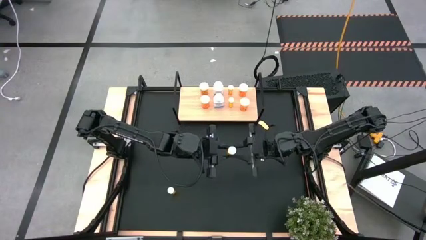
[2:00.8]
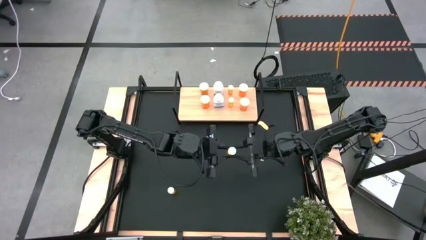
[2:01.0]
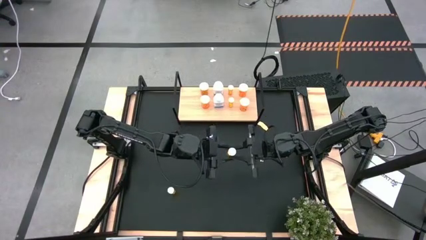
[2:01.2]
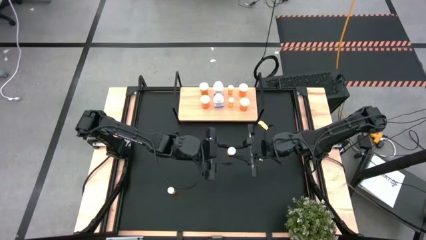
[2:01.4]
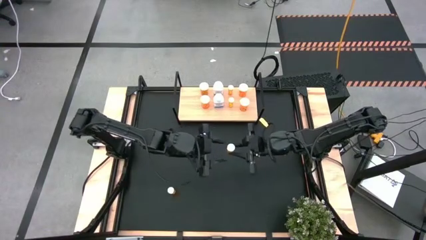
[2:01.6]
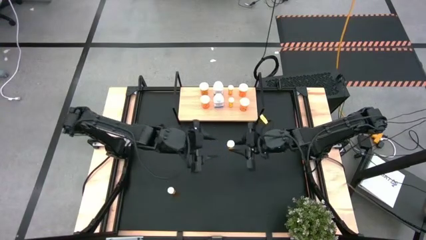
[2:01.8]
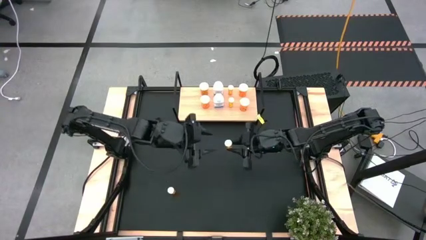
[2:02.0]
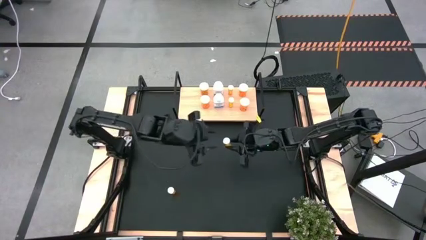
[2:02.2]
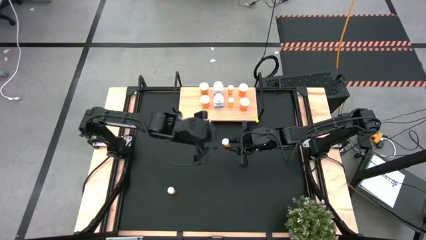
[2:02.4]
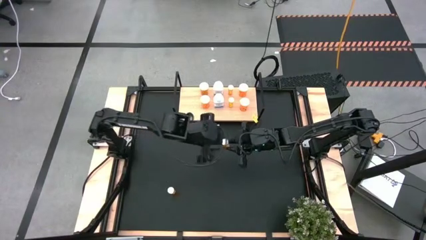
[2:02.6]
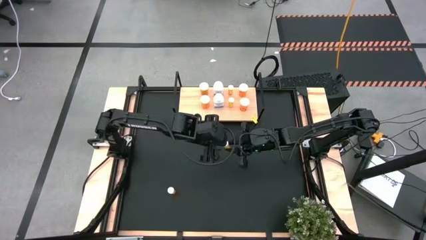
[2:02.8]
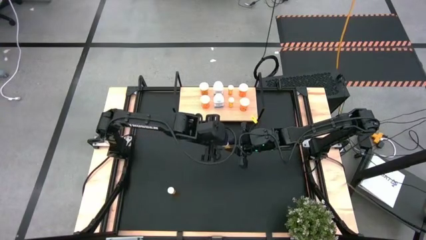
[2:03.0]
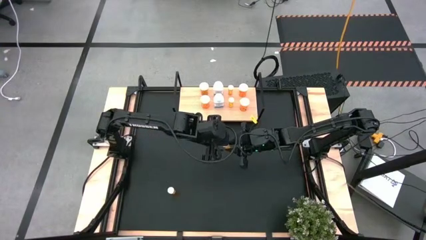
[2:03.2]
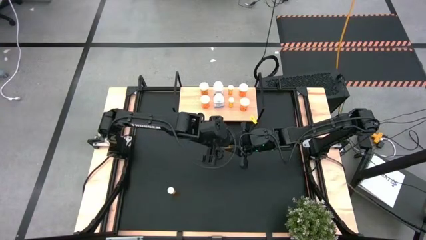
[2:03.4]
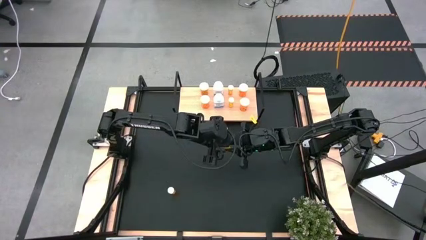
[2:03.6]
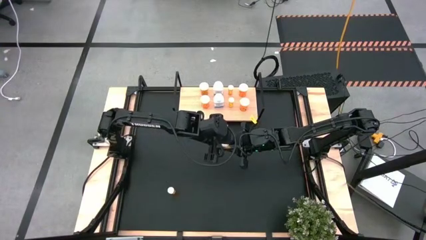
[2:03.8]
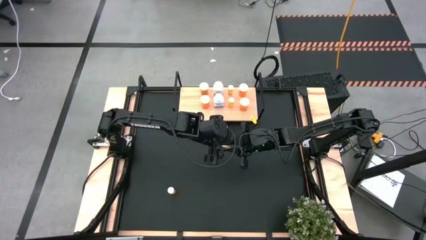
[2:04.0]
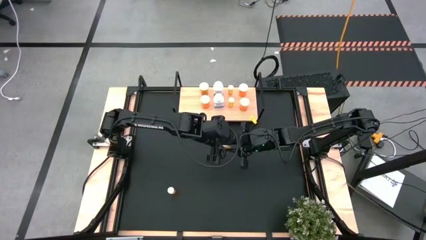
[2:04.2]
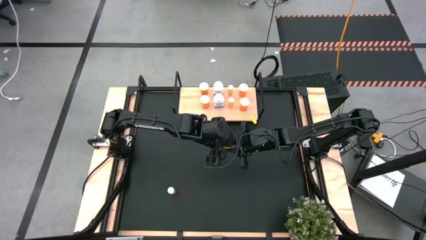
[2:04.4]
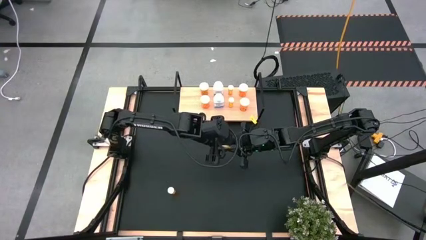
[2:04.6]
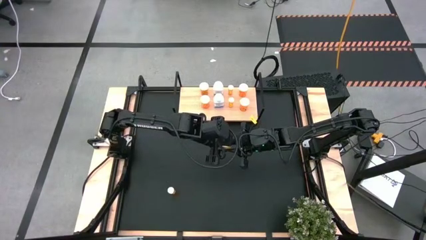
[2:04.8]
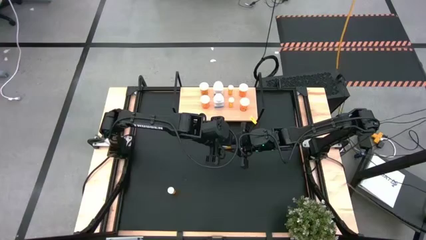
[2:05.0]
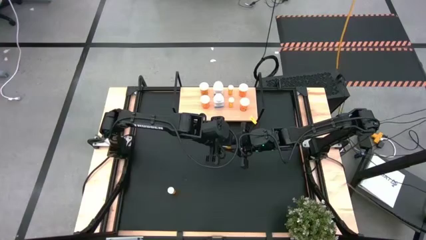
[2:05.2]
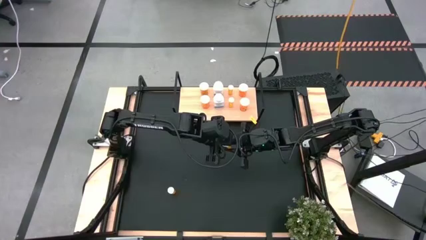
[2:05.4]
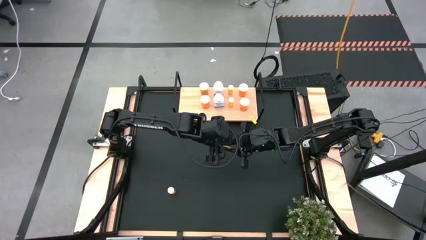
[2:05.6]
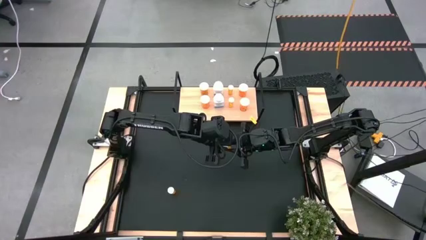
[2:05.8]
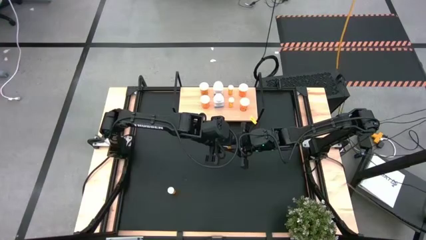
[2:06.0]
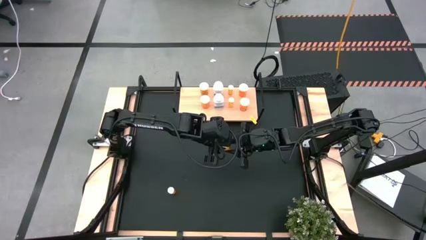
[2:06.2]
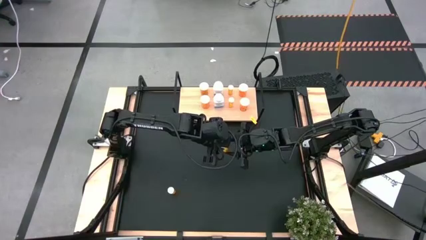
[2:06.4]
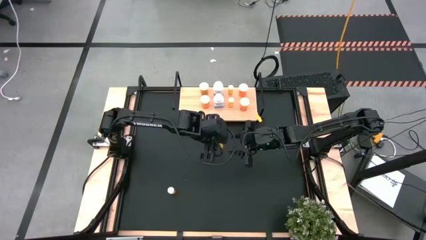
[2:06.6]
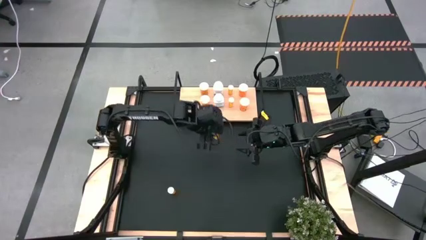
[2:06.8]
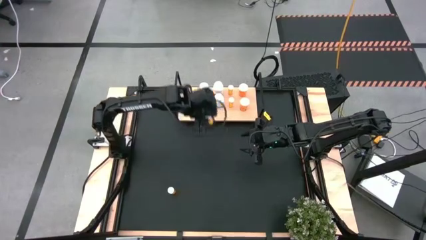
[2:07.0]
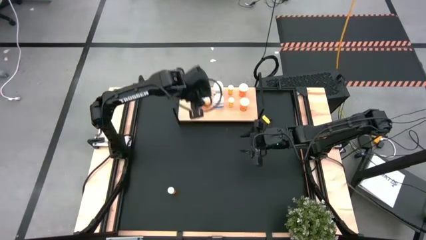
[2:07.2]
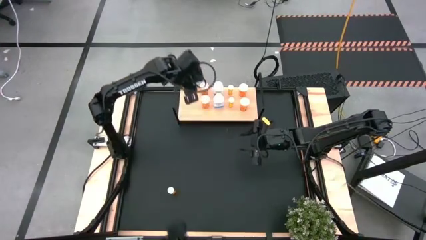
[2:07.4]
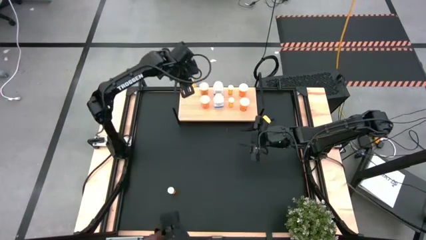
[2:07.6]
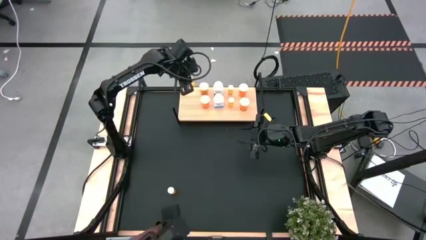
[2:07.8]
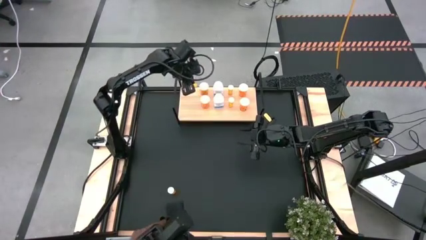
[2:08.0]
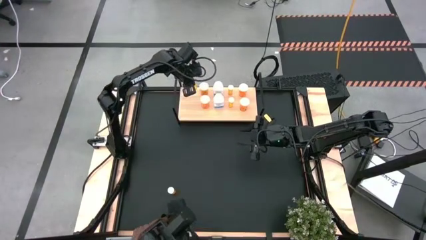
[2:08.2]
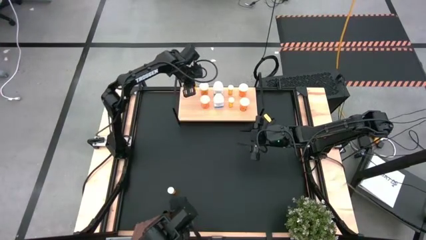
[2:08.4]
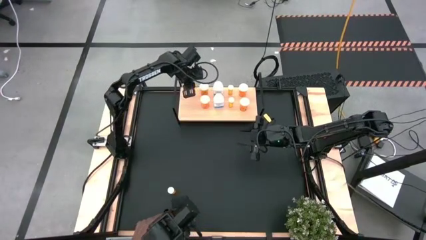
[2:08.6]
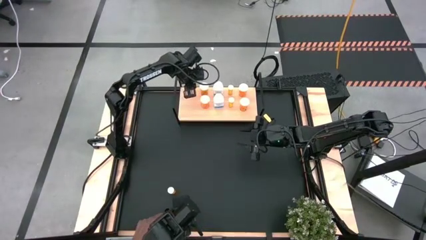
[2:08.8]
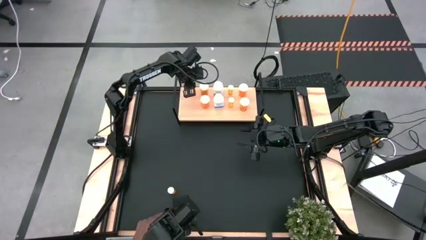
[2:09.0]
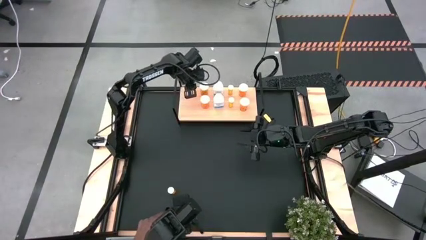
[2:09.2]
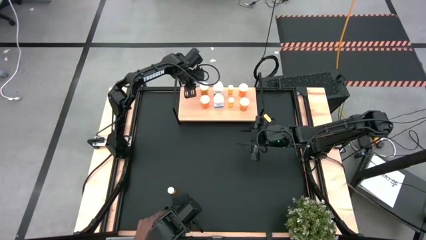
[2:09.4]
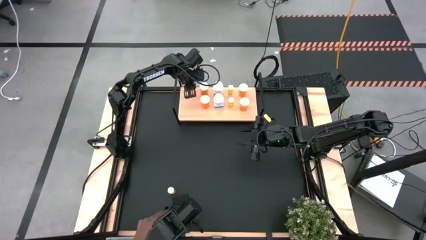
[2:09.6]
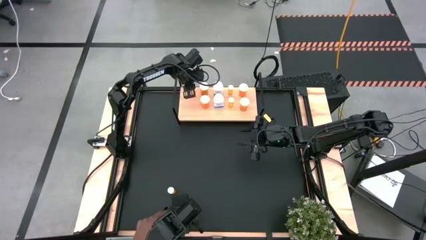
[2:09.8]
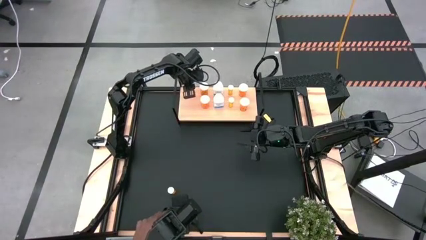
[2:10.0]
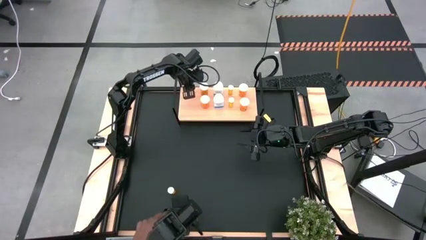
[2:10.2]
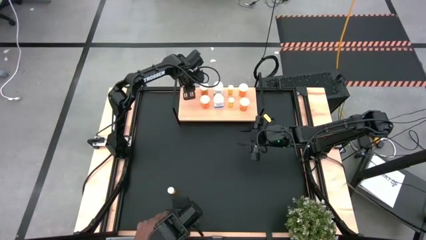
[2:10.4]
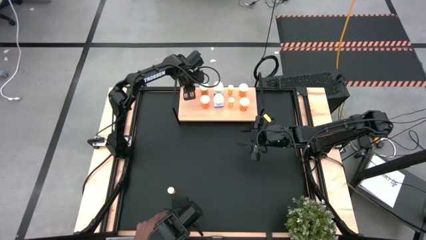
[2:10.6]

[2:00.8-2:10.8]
Task: Pick and place medicine bottles onto shelf by color
Put the right big orange pill bottle on the shelf

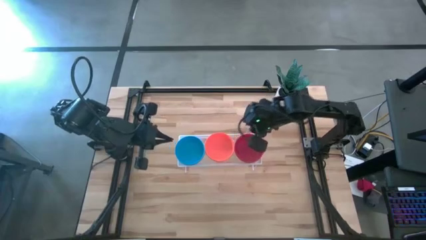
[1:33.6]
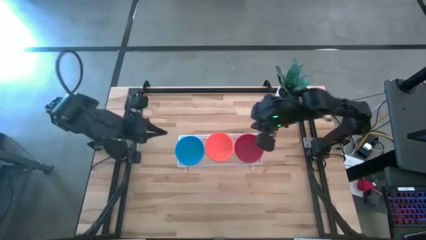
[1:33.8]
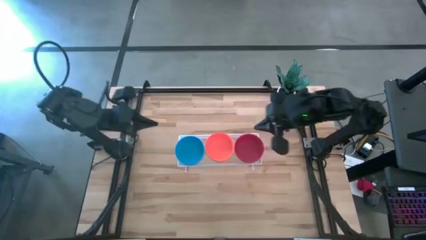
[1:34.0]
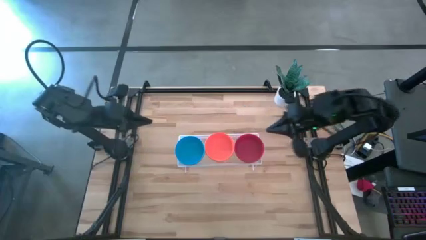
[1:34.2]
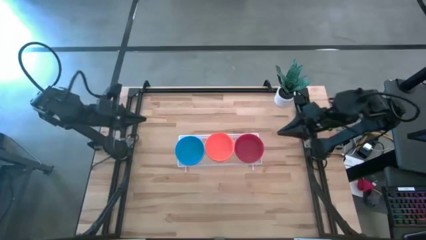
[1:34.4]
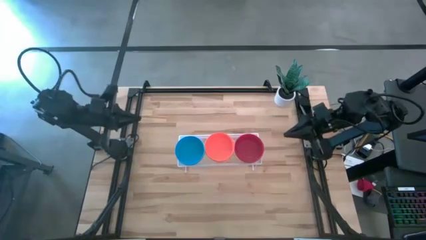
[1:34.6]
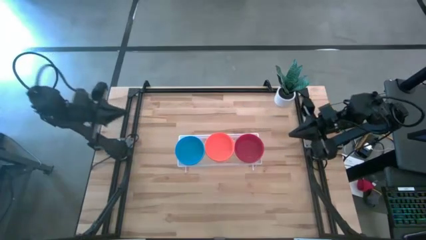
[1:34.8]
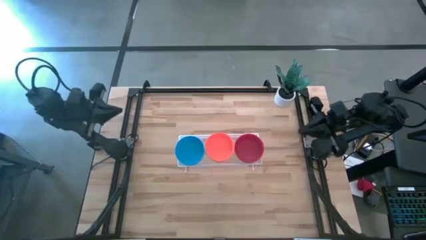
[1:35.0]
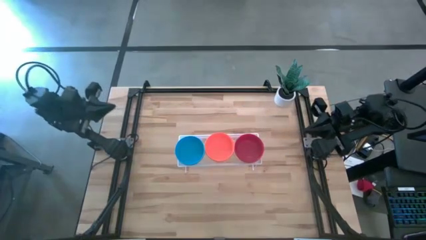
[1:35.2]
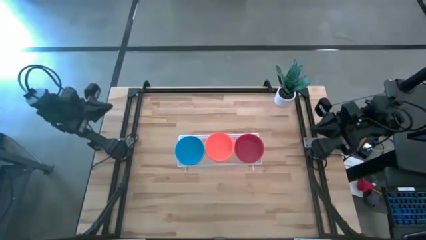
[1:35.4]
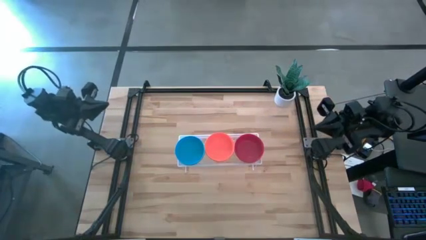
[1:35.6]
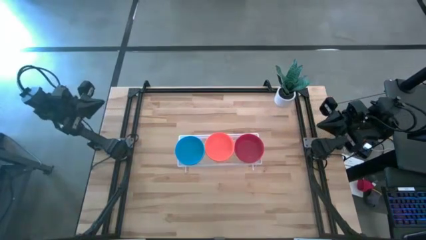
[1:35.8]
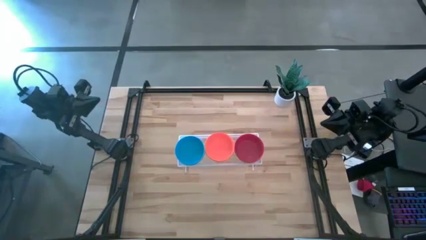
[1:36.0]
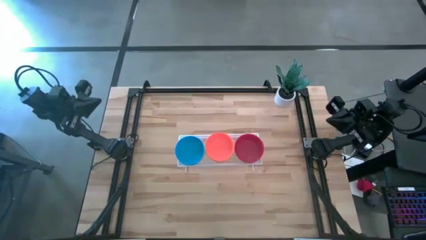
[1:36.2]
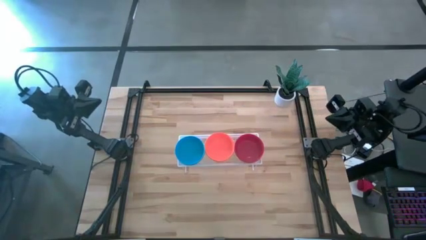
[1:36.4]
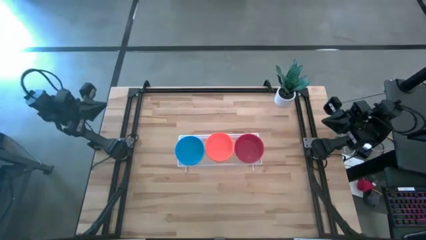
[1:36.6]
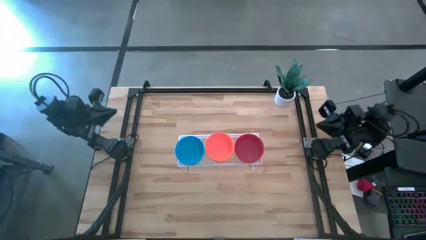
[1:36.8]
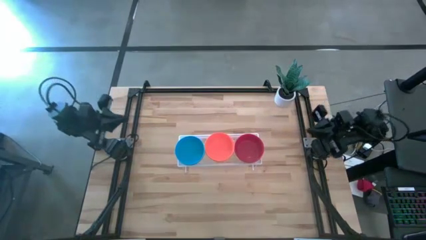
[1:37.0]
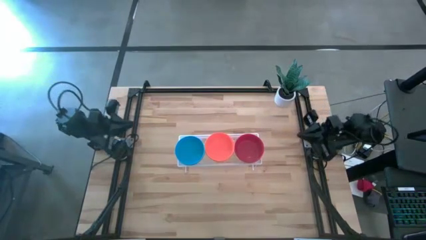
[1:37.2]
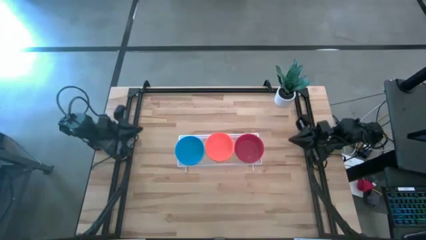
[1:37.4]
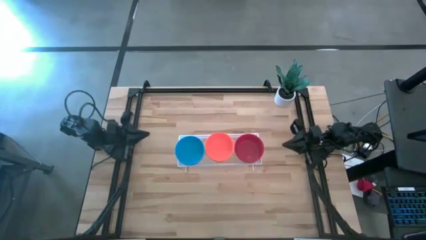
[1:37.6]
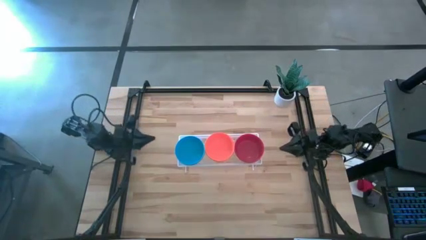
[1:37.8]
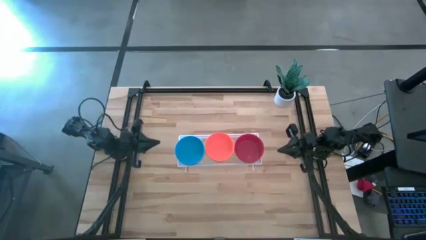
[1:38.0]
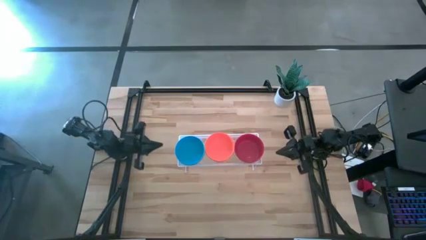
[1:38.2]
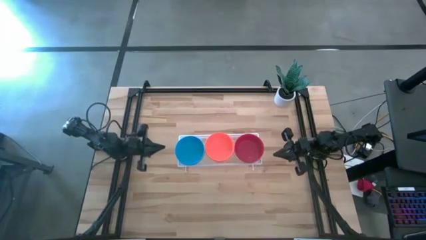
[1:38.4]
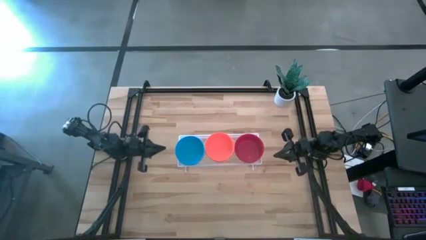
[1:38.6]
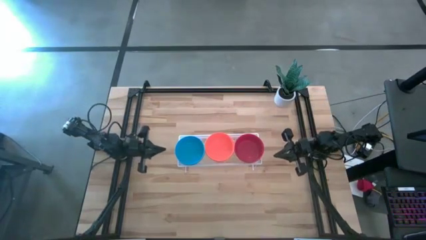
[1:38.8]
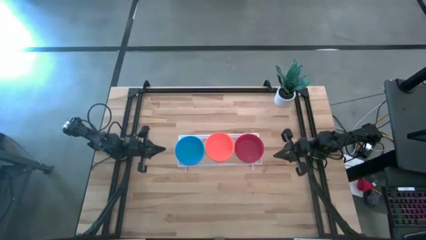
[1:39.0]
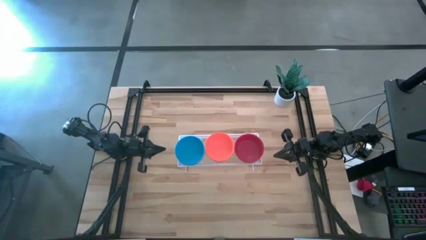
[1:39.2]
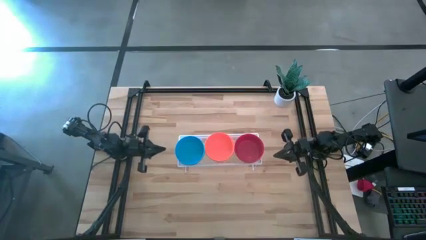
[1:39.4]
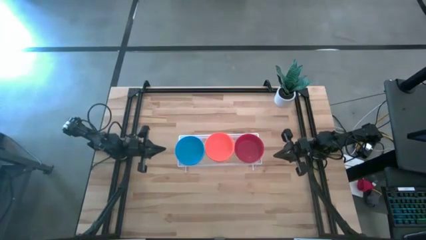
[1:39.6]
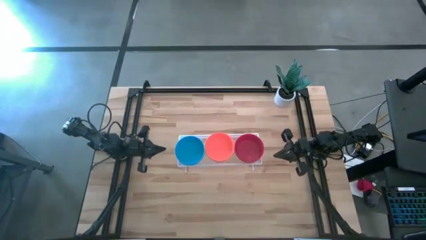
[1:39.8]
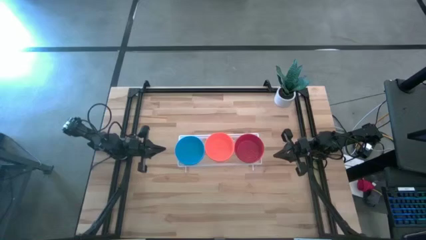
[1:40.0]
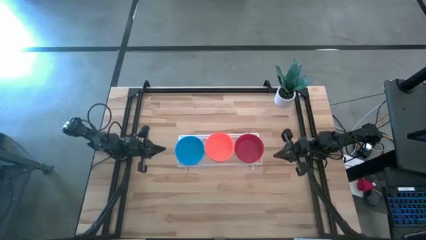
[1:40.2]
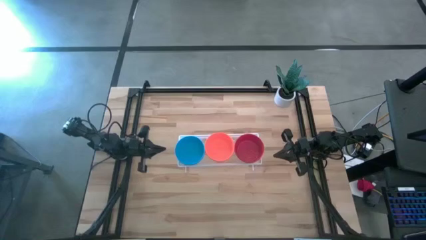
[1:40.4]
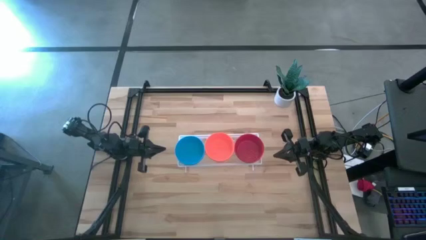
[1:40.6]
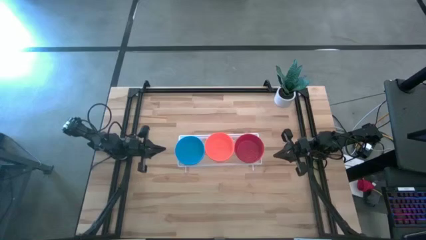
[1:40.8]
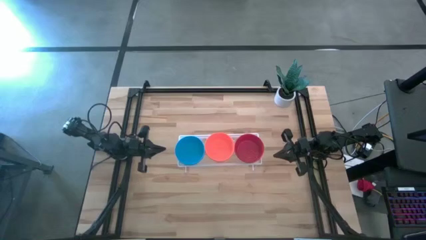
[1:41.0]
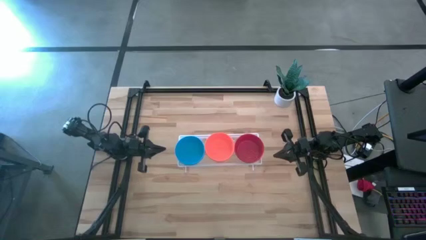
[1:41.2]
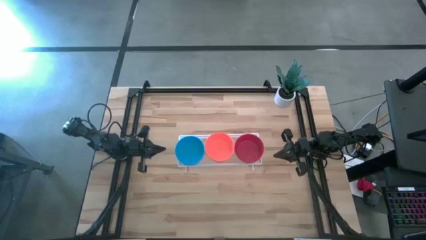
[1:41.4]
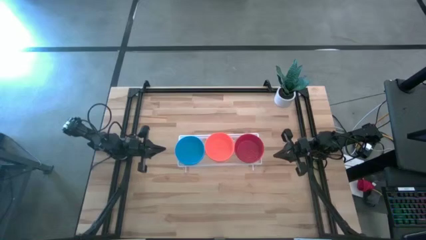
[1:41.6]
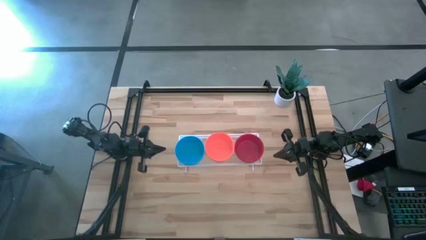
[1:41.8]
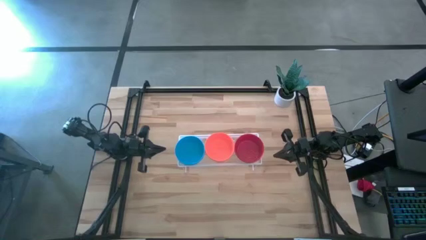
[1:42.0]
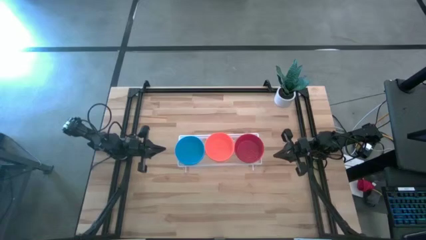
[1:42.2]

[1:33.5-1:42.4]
Task: Pick & Place Mini bowls
Return to Home Position
